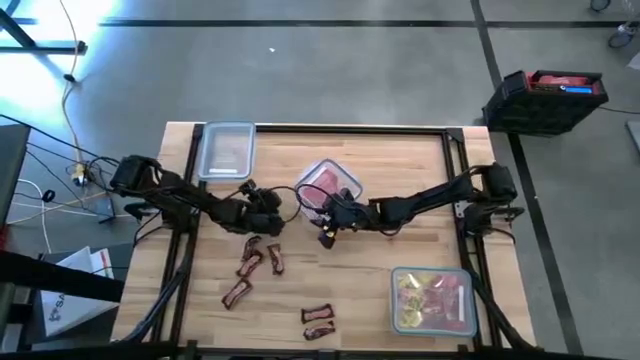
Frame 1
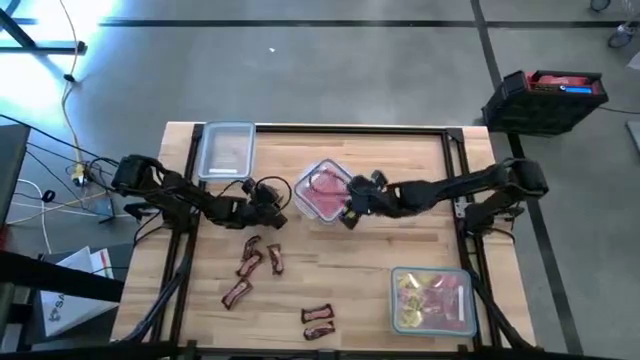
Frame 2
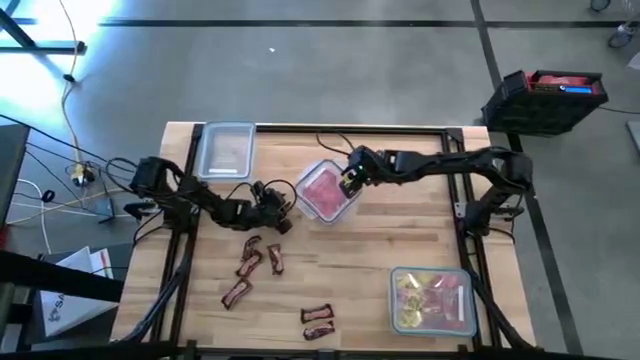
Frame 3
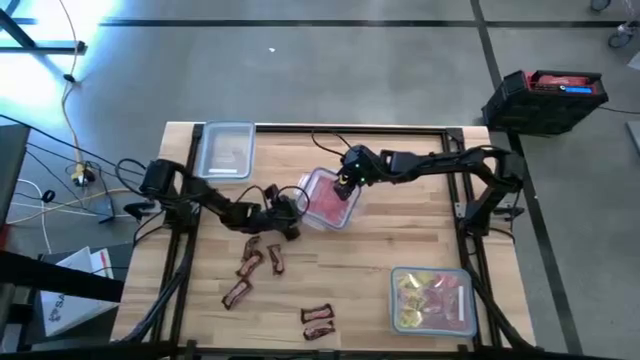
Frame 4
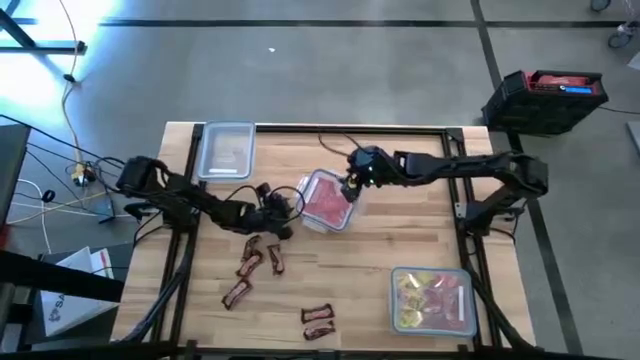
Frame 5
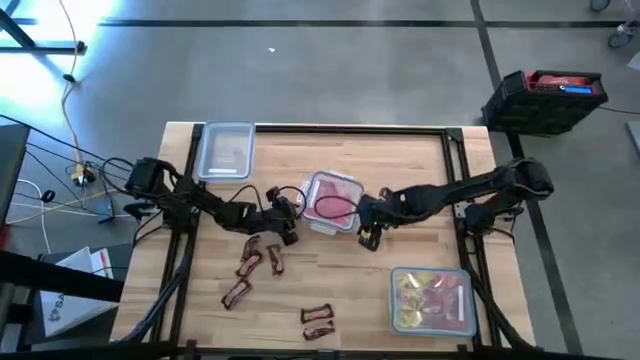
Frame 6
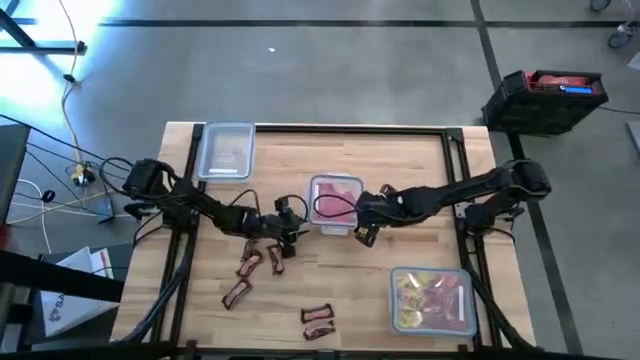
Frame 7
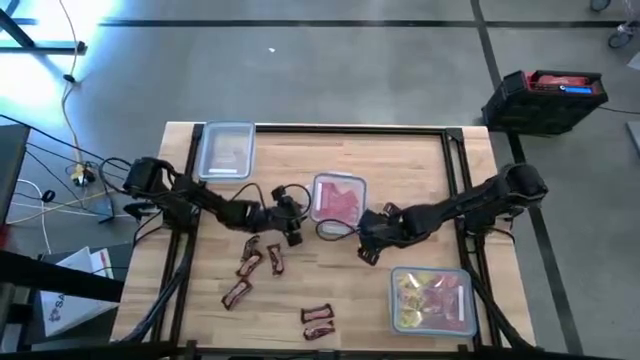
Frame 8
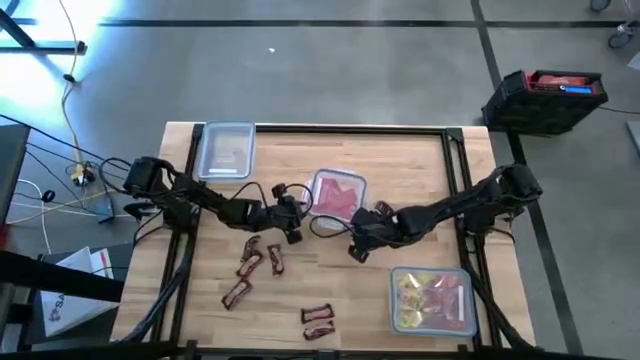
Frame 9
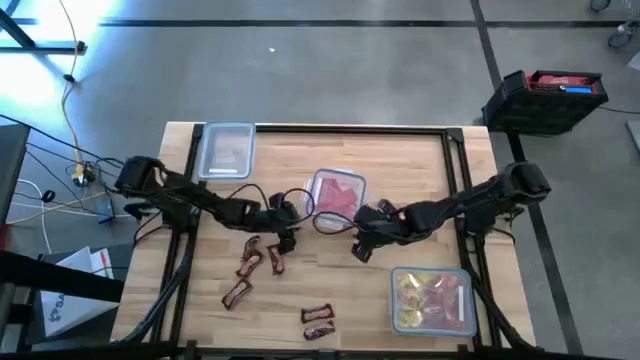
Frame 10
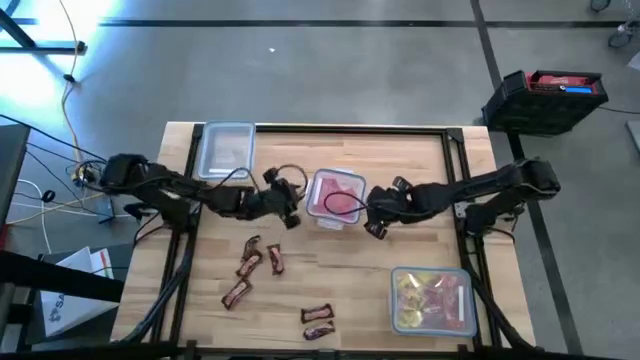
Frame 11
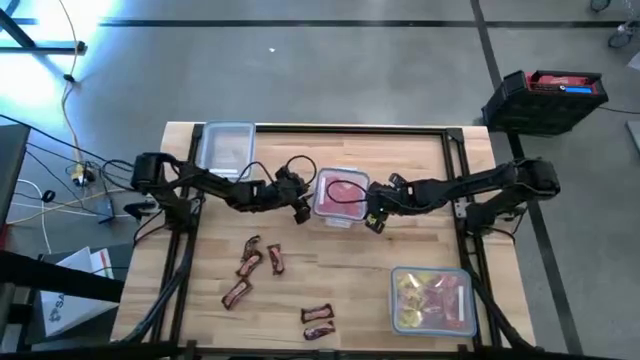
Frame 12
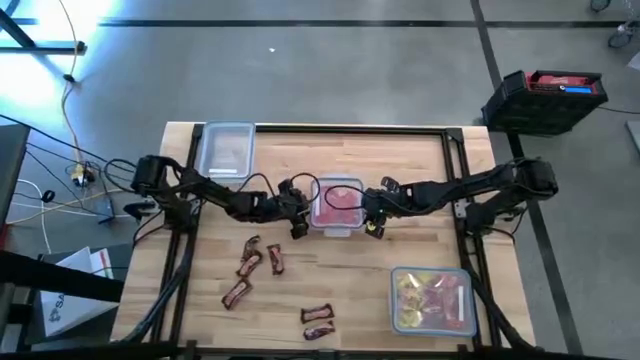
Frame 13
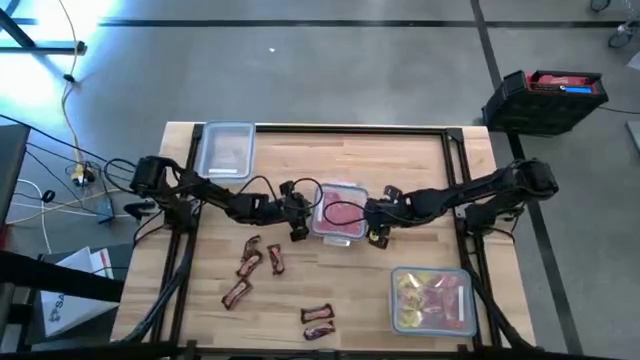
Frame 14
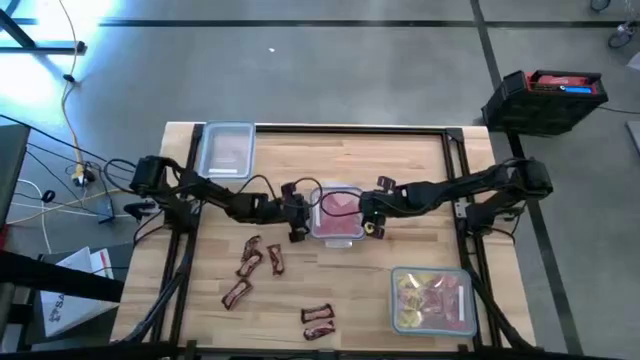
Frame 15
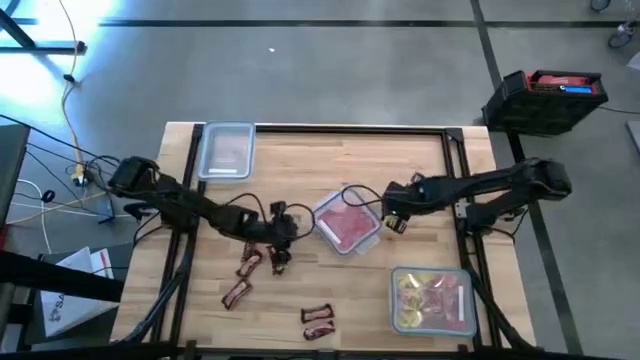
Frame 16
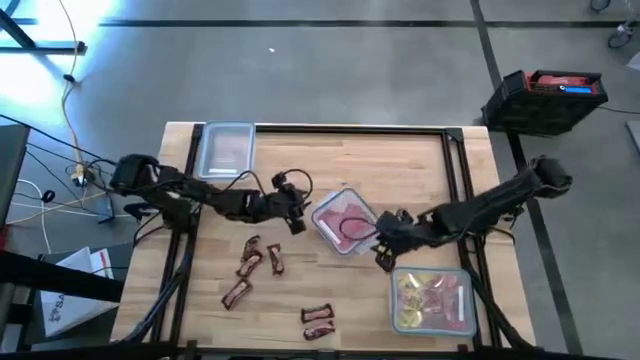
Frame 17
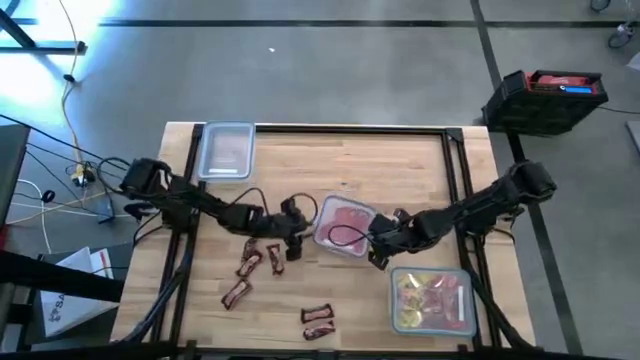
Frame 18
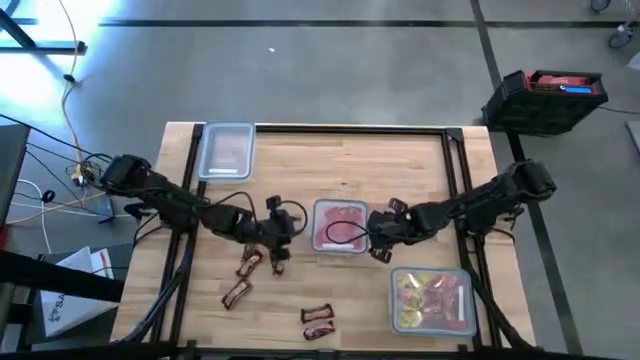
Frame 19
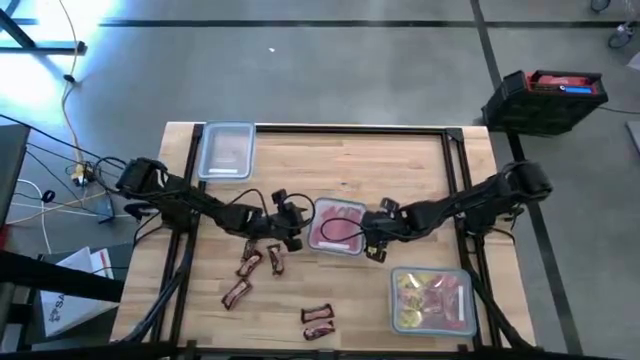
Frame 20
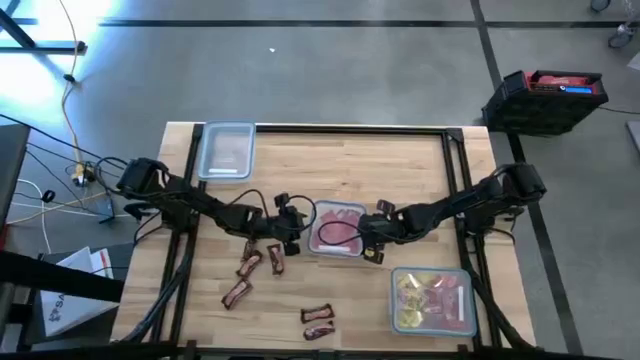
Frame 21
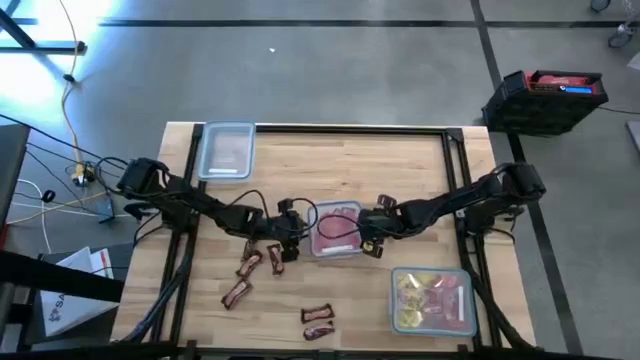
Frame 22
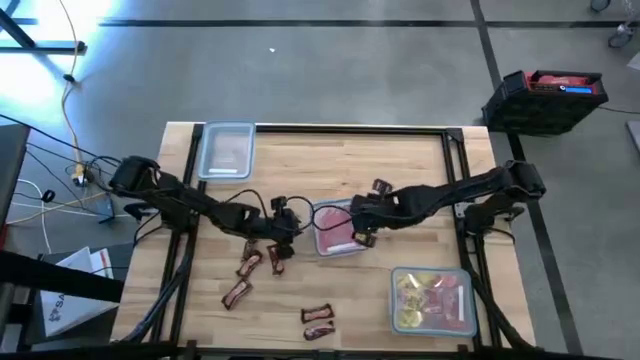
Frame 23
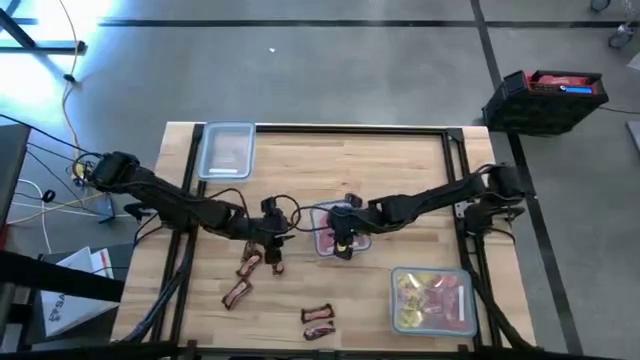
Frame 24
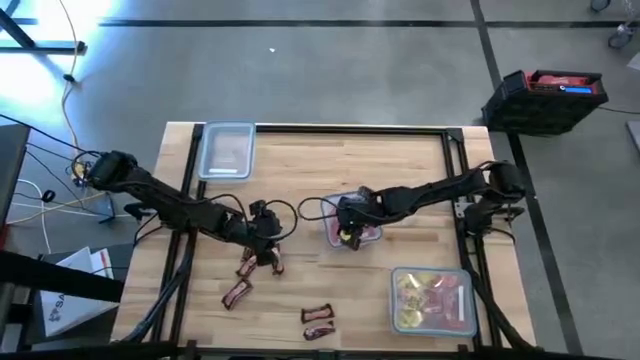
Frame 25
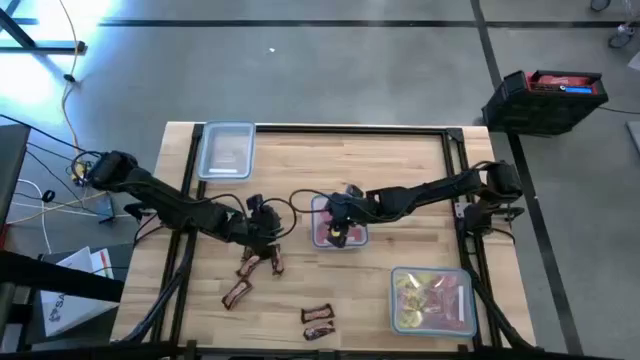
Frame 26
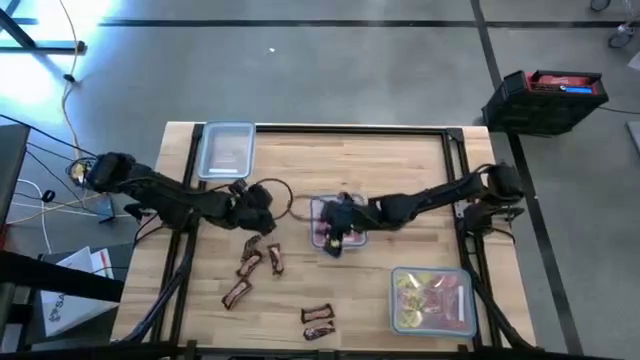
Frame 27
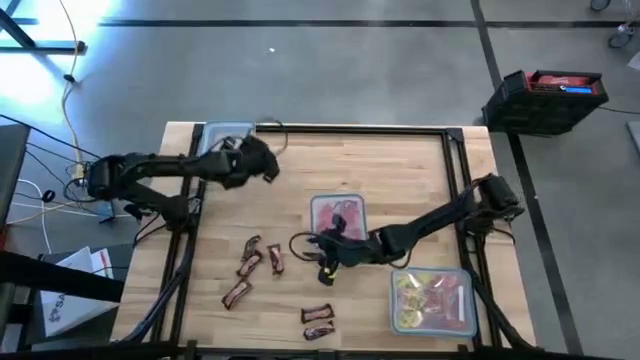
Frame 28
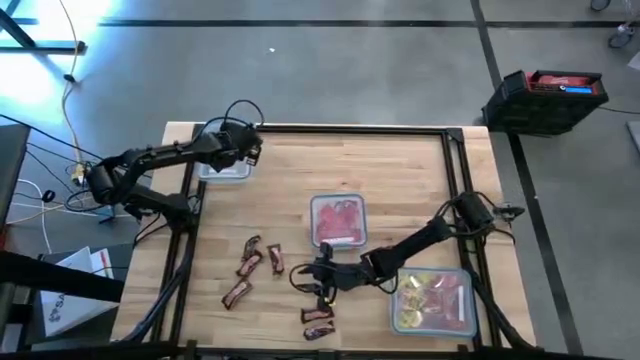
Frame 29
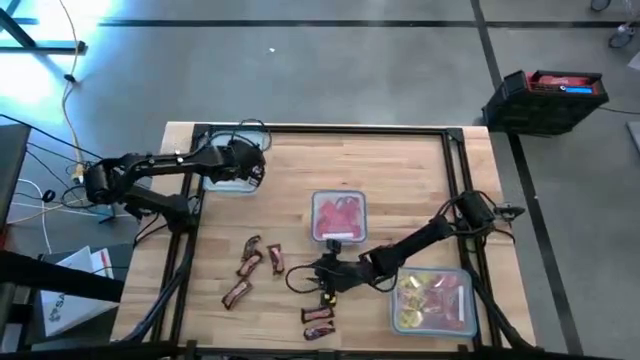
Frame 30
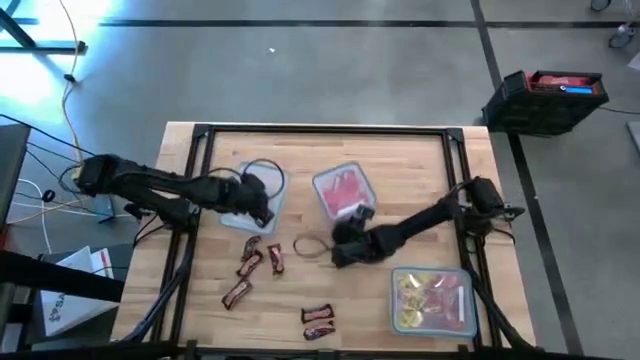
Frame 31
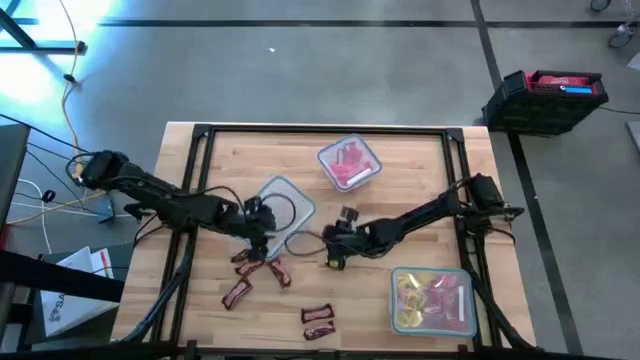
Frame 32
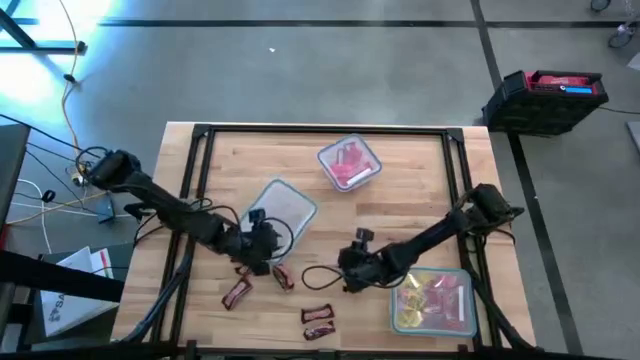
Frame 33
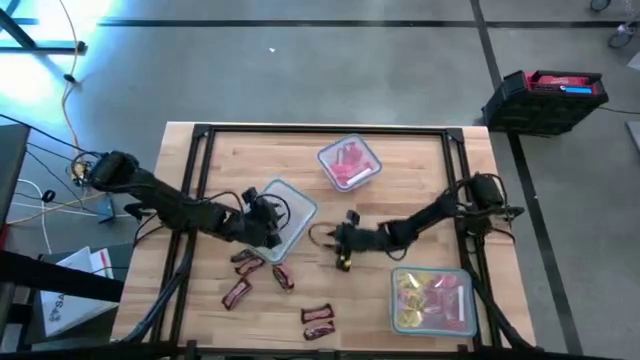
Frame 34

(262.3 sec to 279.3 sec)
Task: Sort candy
Open the transparent bin

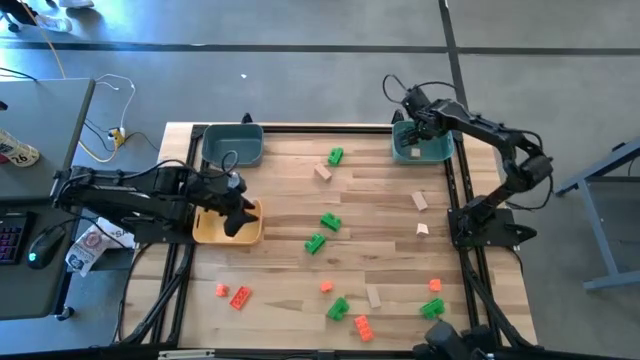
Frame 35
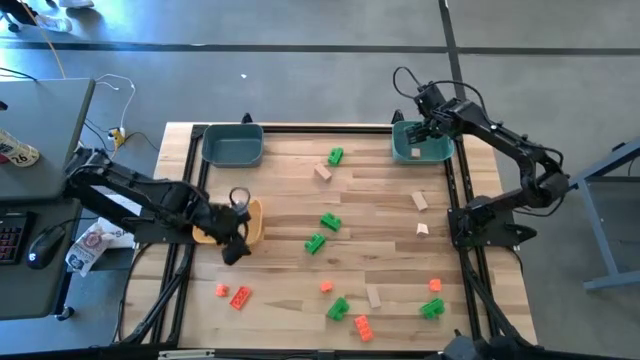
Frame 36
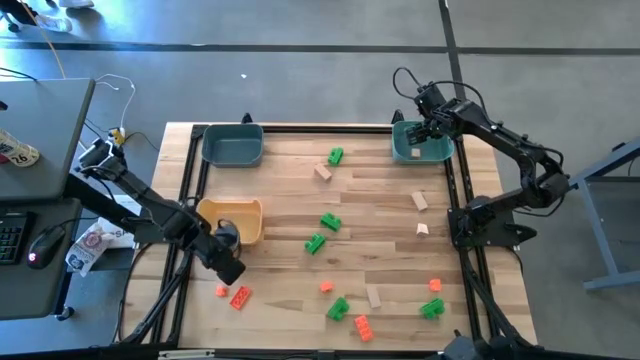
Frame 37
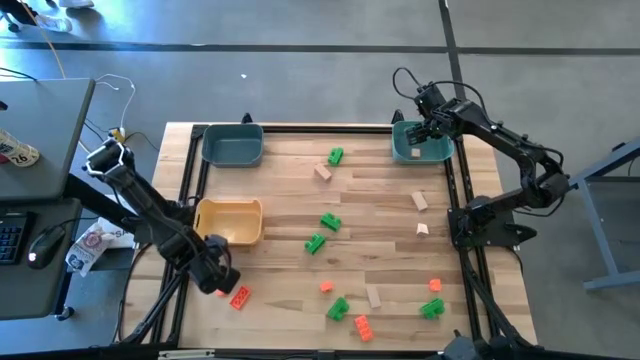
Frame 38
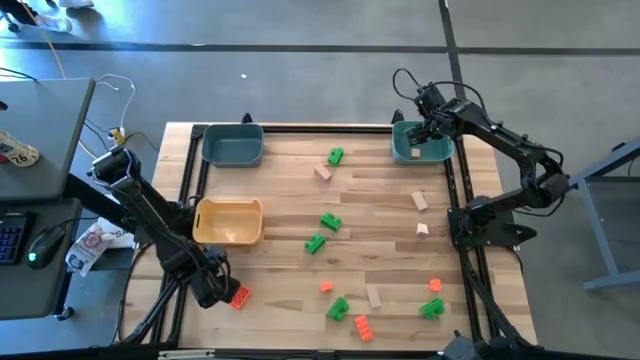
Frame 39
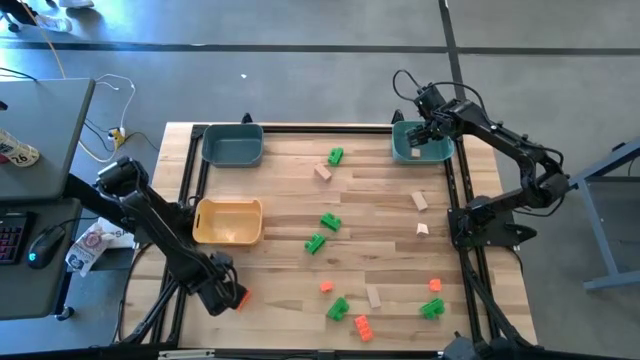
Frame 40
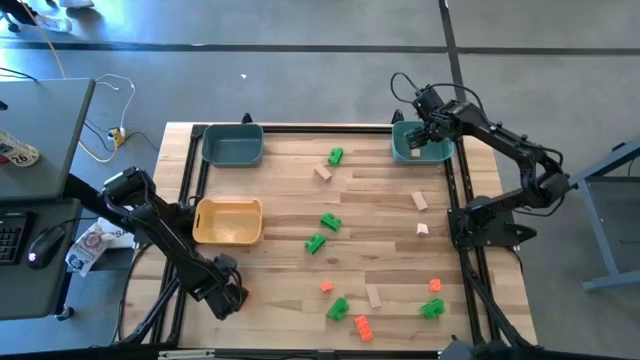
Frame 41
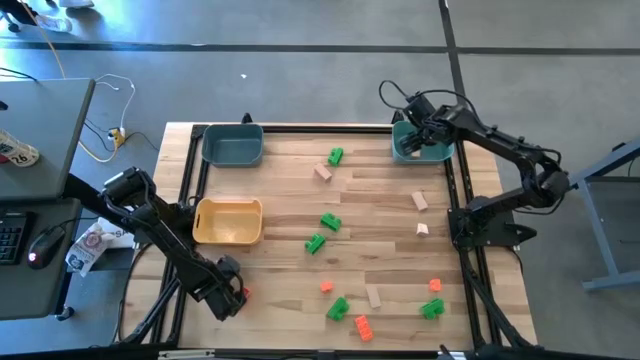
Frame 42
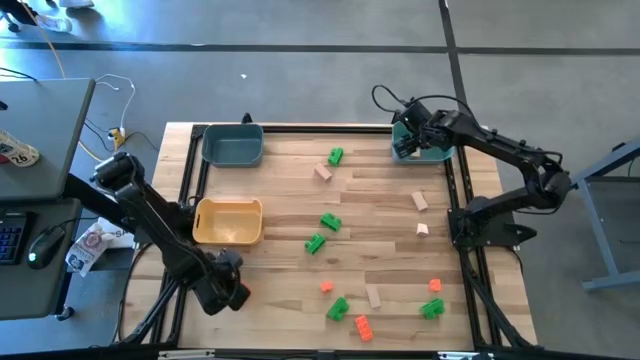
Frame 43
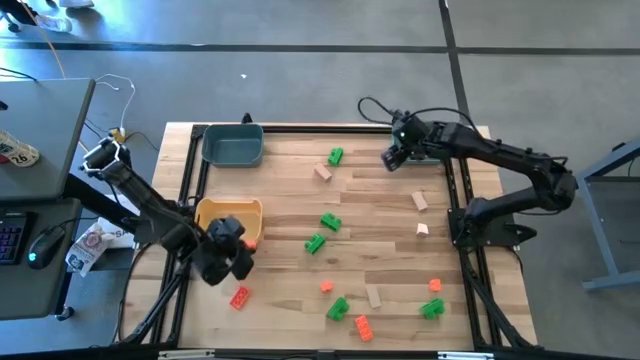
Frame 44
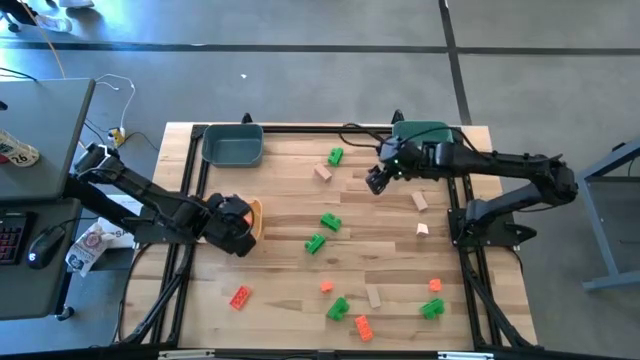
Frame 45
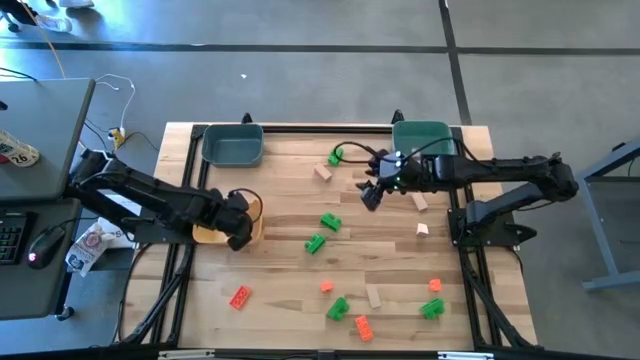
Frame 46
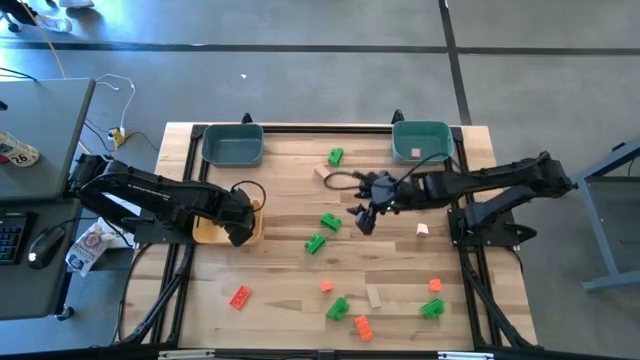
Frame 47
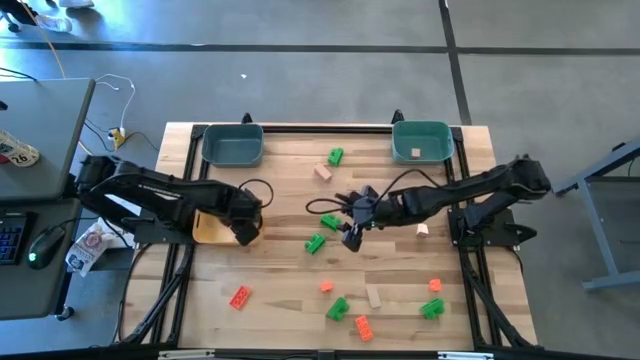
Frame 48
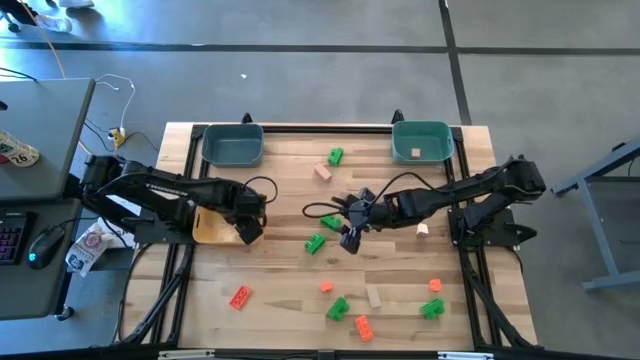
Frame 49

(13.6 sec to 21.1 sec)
Task: Sort & place blocks by color
Put the orange game piece into the yellow bin
